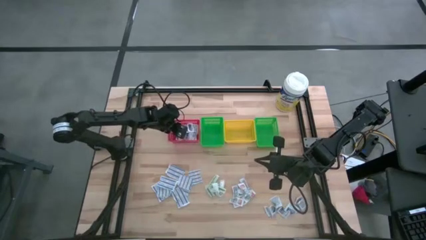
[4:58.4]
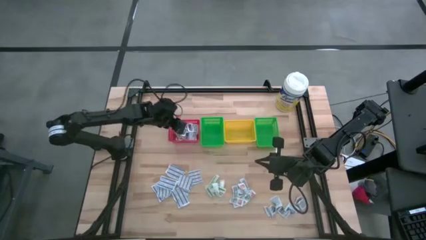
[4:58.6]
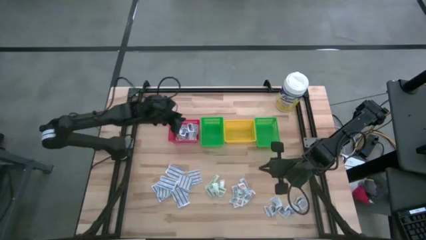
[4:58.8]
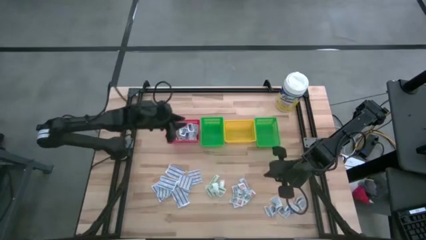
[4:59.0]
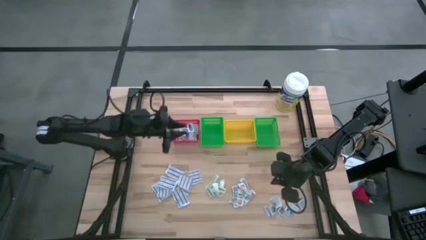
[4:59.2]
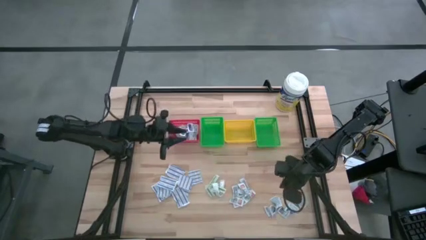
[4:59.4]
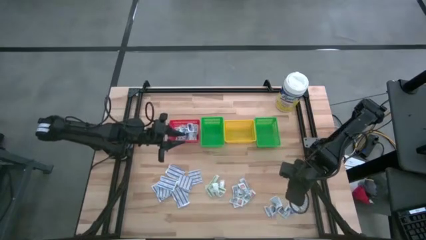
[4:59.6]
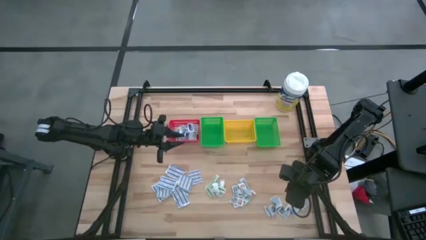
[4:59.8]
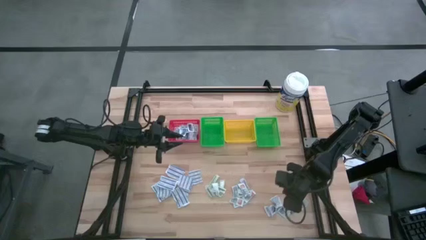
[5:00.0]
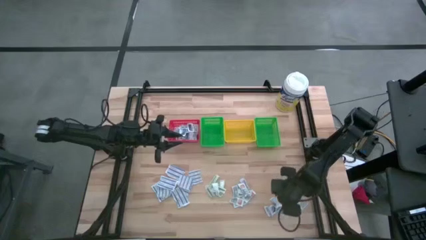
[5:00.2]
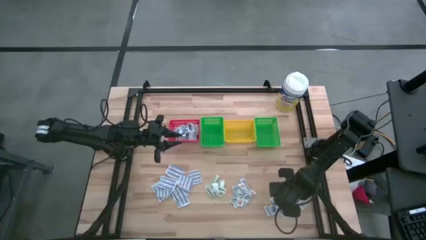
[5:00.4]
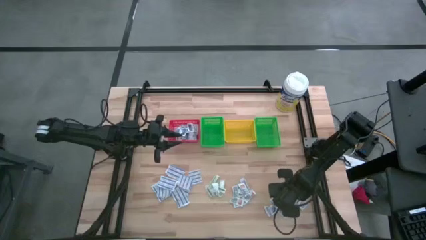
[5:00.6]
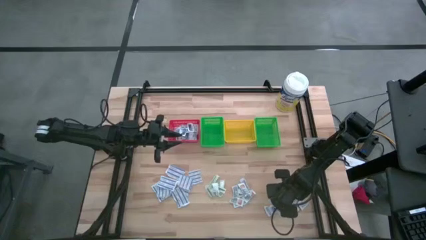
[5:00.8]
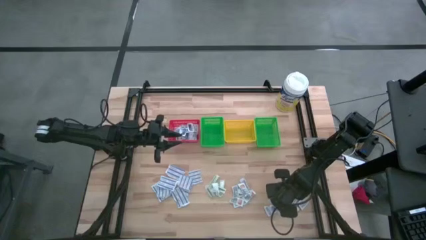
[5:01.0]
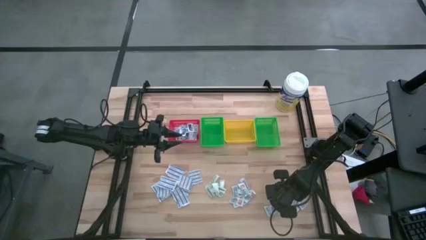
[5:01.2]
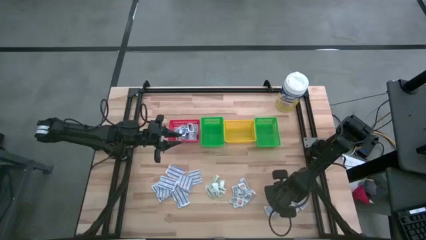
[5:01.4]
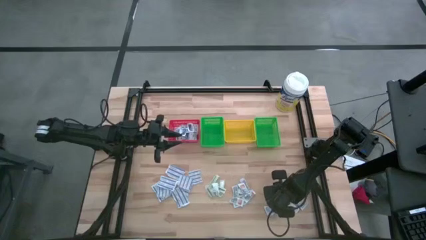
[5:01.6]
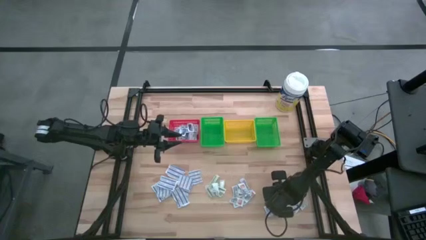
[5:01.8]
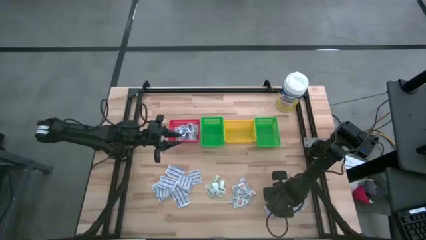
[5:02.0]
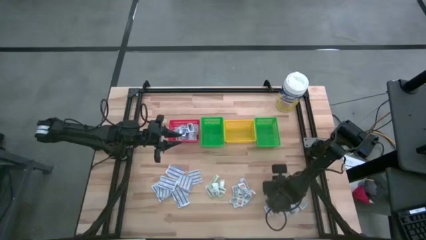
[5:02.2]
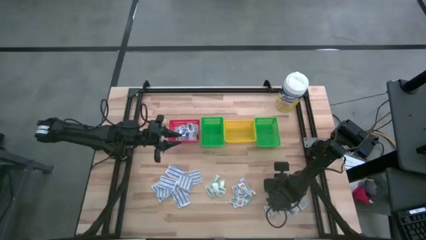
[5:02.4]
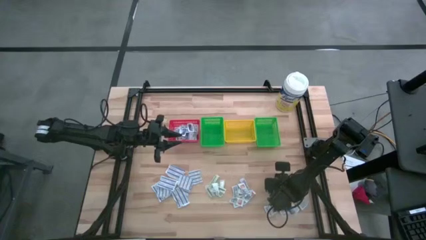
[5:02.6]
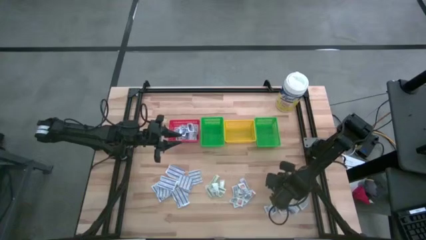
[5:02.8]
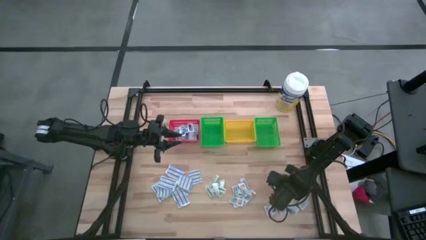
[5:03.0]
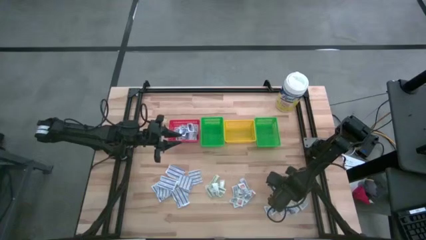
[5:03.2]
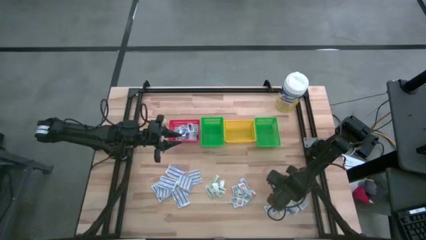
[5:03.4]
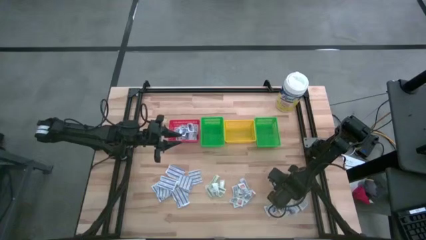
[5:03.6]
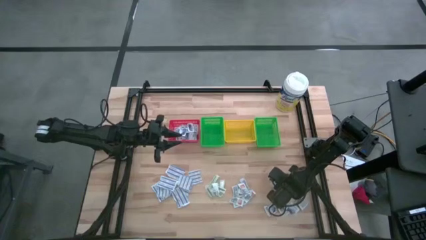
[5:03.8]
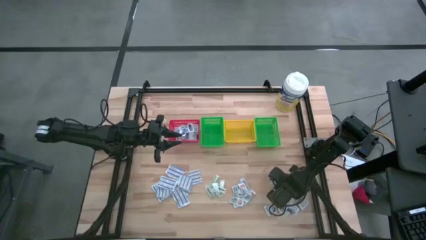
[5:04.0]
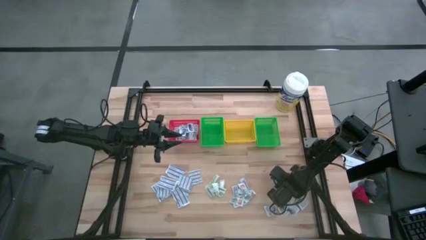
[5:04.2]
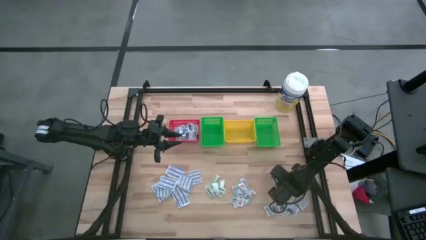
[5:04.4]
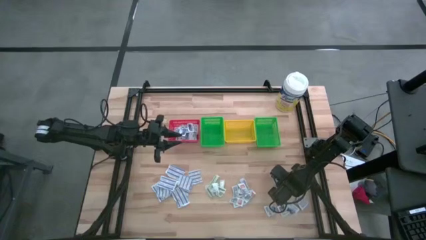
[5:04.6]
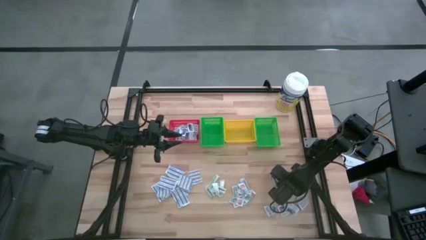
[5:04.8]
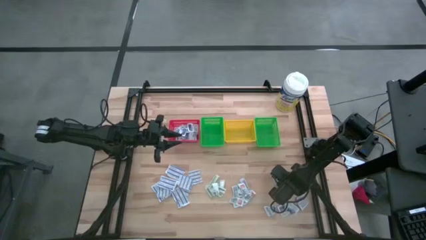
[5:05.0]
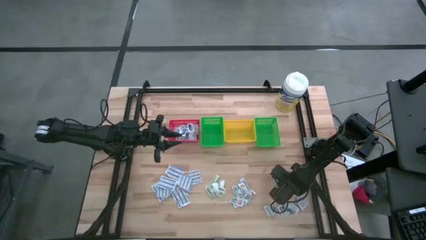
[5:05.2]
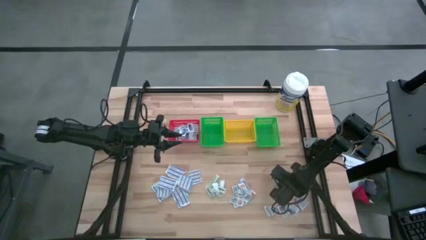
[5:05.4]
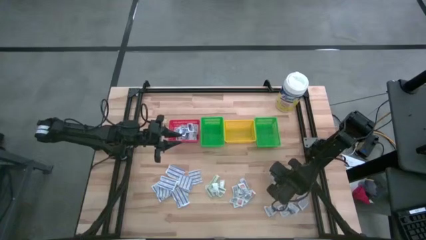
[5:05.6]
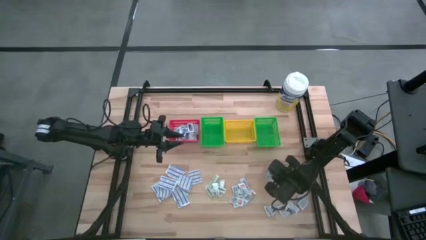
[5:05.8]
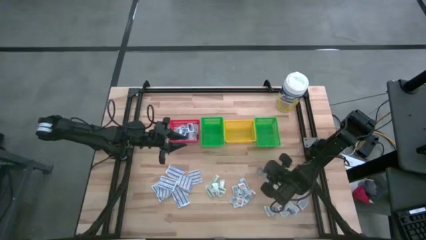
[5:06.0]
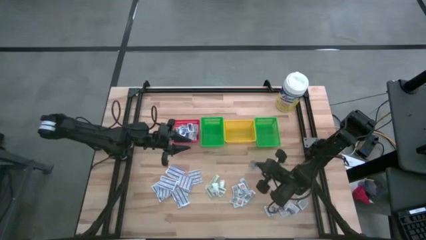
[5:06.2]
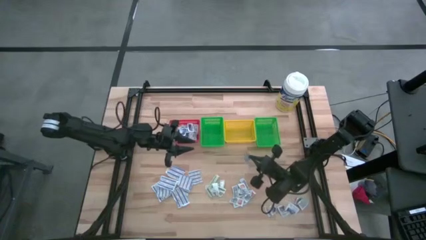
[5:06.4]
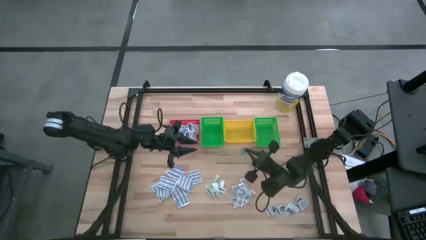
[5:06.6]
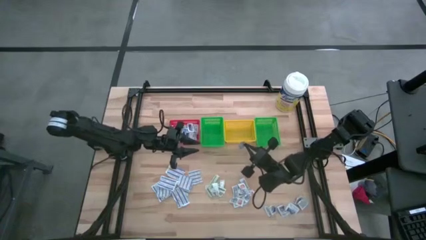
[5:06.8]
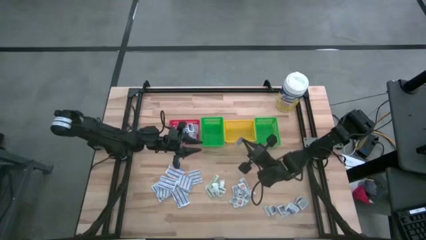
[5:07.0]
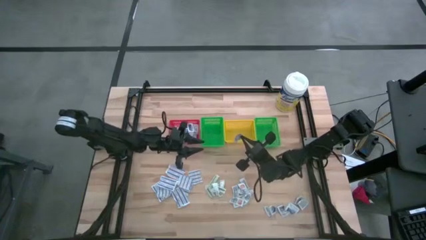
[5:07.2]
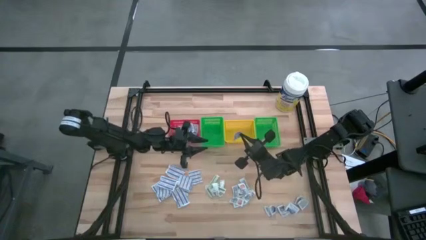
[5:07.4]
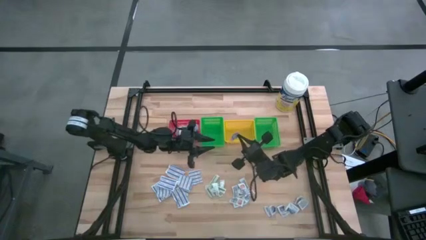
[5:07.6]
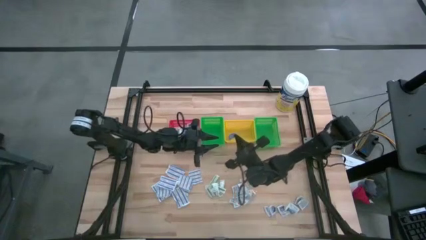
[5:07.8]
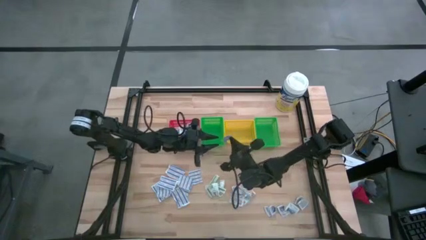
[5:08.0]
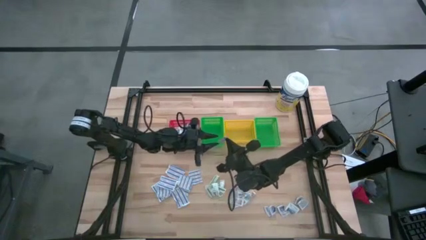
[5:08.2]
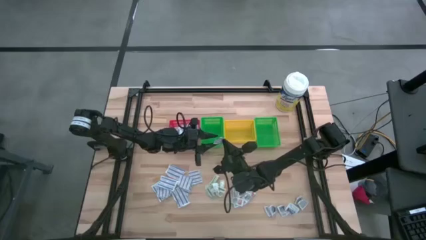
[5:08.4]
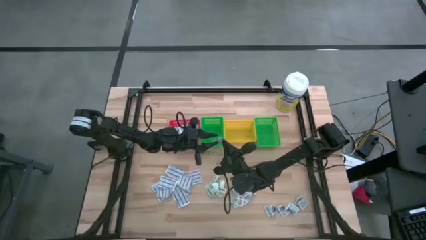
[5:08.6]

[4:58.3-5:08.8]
Task: Pick & Place First Aid Supplies
Put the alcohol pad into the red basket

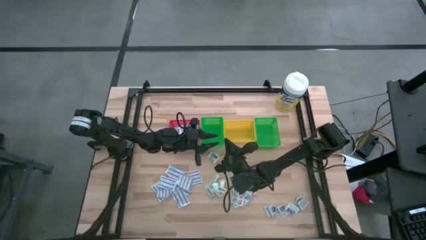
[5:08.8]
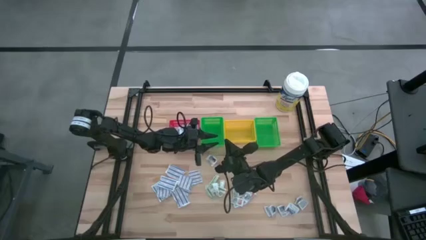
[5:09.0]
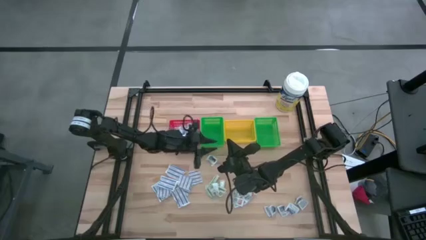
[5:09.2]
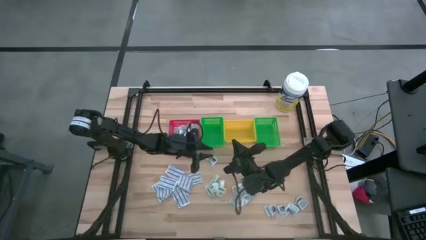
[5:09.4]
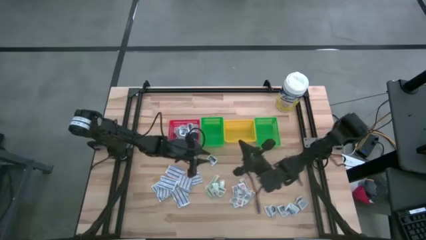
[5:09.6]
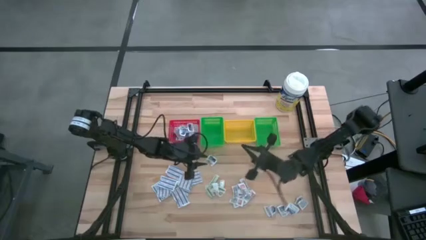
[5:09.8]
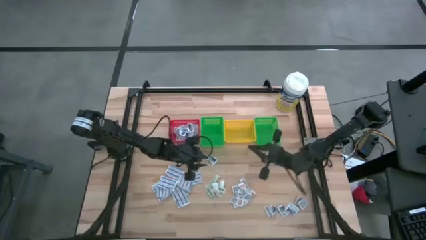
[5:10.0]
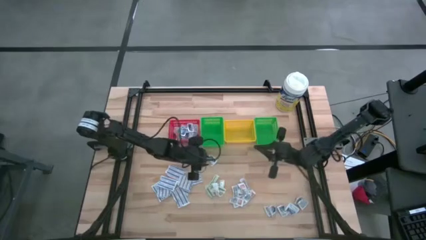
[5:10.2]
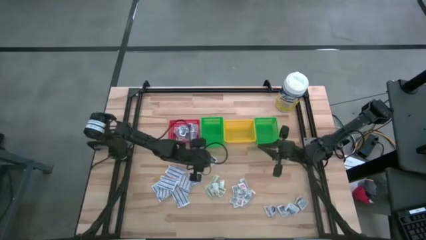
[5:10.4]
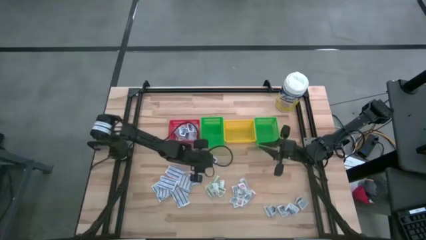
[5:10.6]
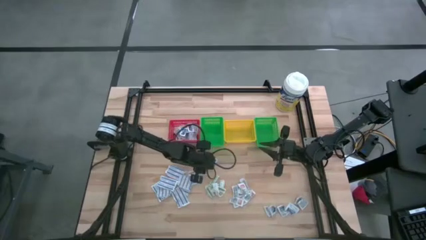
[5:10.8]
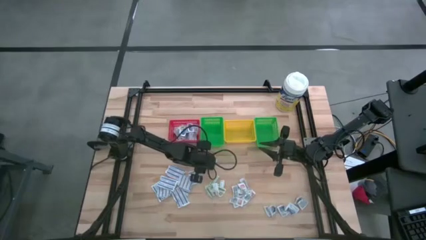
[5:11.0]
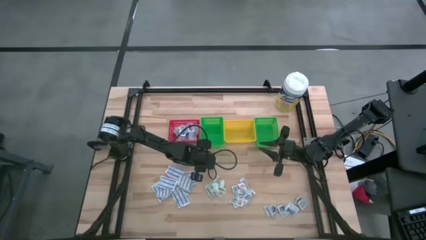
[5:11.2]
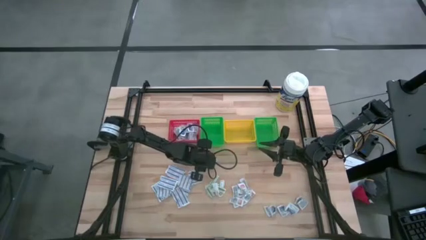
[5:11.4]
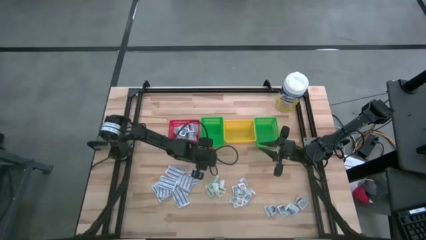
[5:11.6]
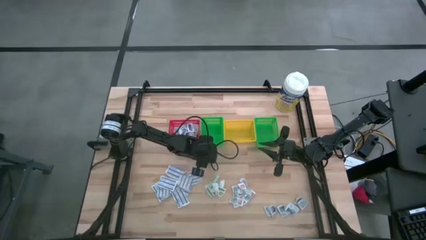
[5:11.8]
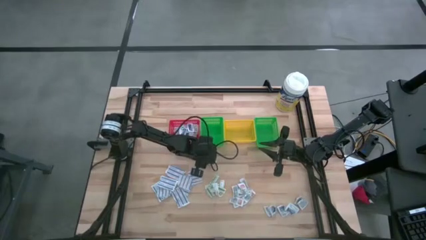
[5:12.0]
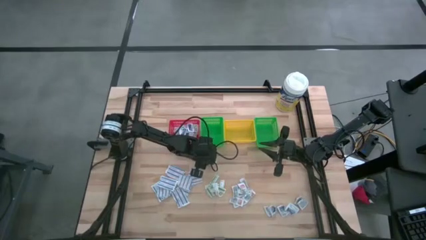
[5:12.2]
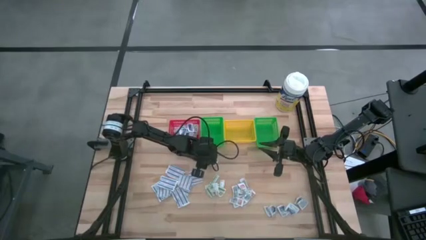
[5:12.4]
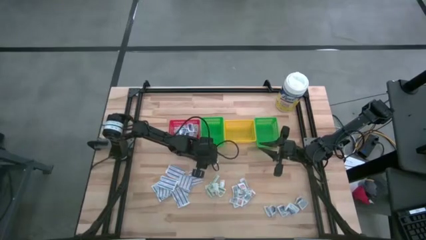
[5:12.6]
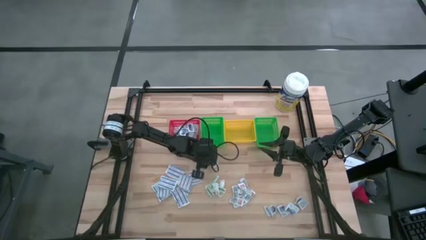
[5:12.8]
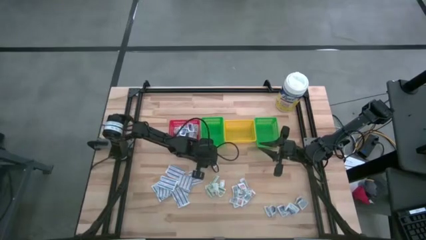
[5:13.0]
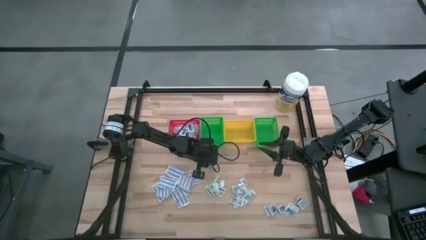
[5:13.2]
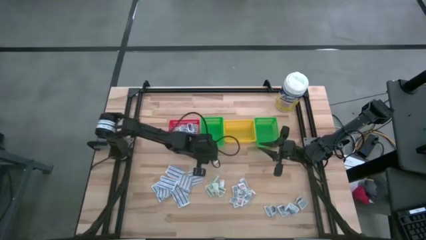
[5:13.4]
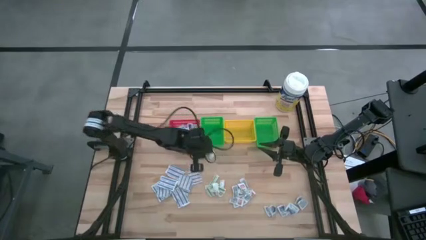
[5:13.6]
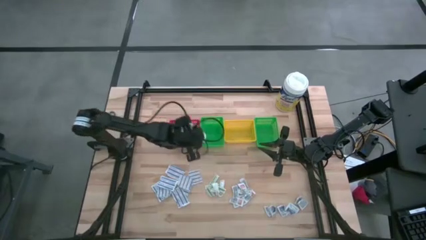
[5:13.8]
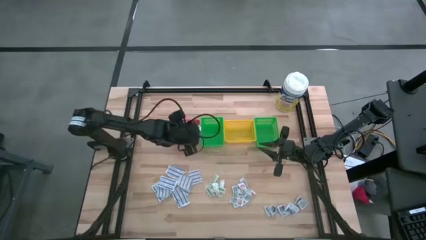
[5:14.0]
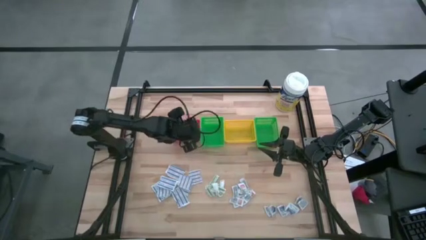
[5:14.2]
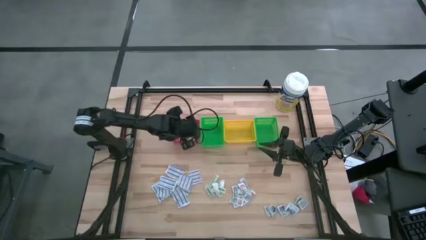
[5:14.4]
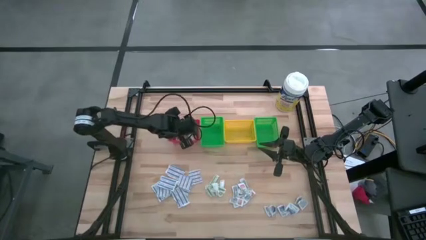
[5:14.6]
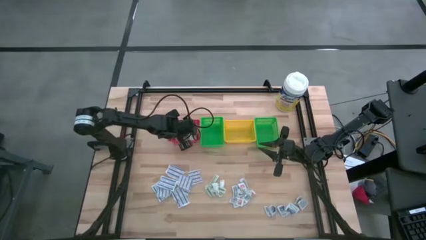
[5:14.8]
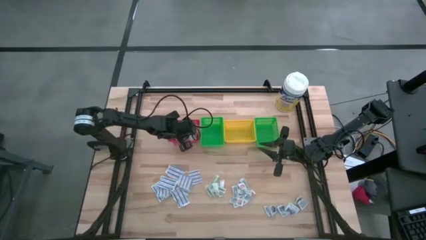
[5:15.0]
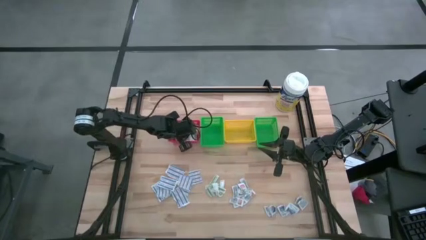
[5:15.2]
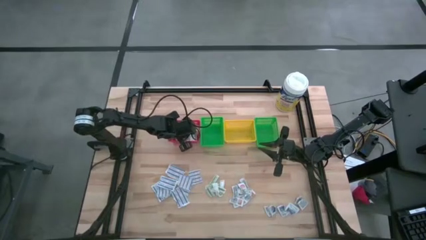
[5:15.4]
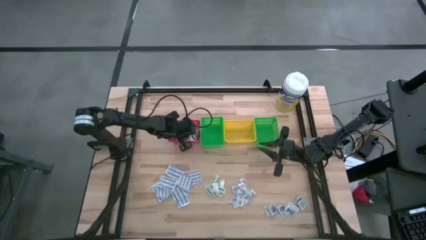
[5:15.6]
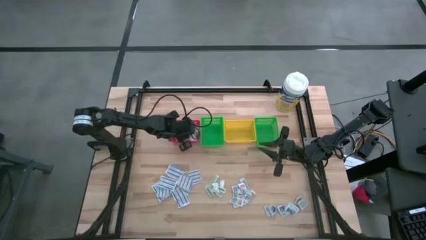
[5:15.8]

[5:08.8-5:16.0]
Put the alcohol pad into the red basket
